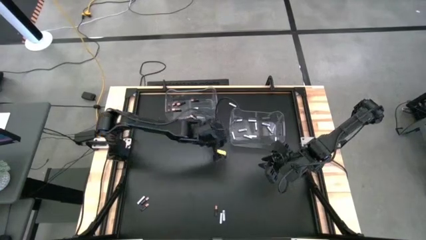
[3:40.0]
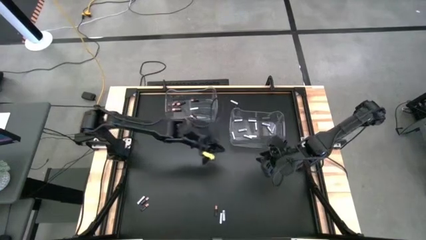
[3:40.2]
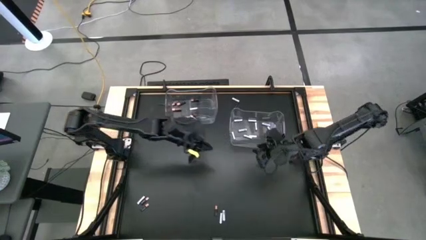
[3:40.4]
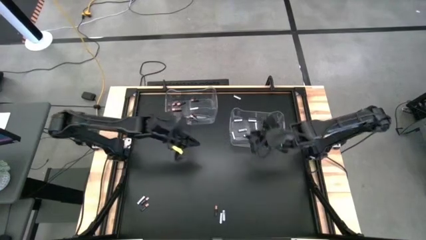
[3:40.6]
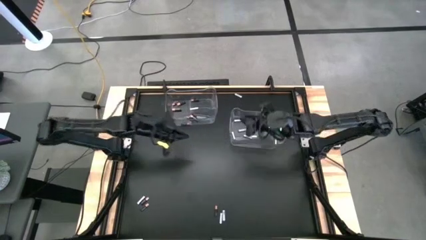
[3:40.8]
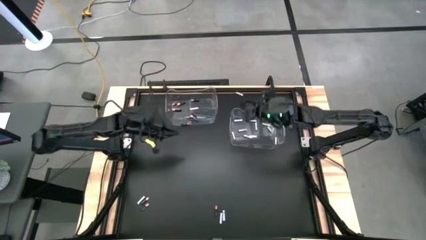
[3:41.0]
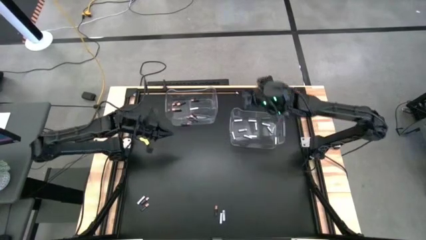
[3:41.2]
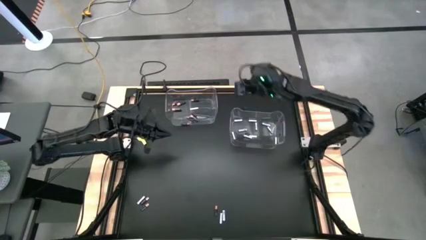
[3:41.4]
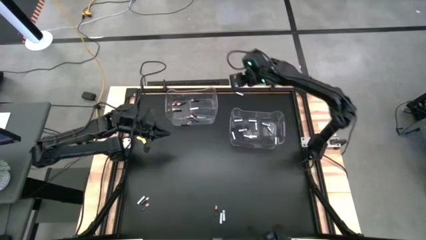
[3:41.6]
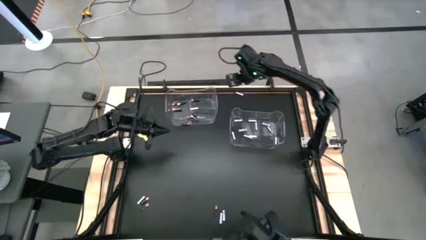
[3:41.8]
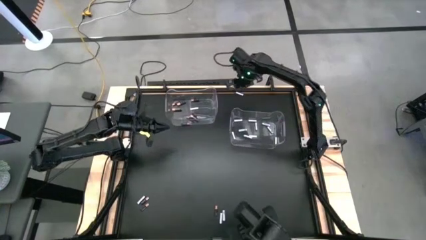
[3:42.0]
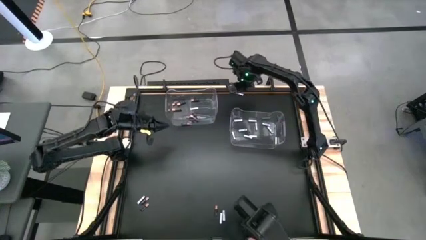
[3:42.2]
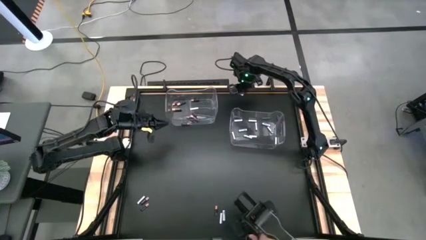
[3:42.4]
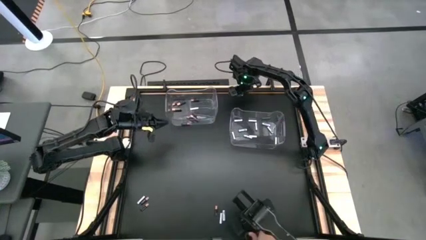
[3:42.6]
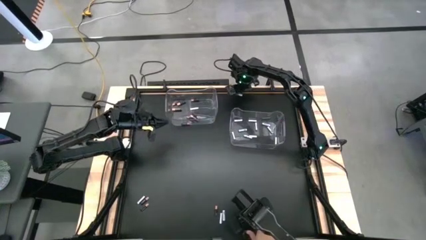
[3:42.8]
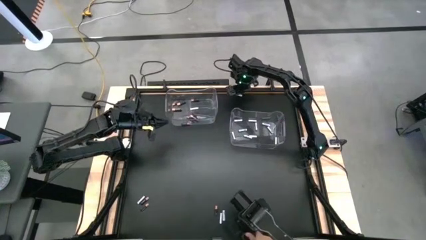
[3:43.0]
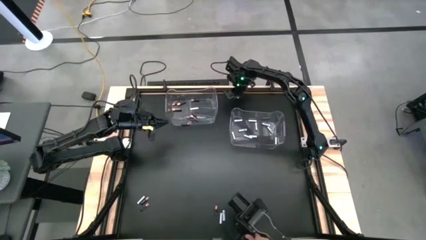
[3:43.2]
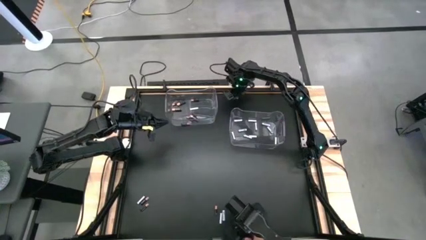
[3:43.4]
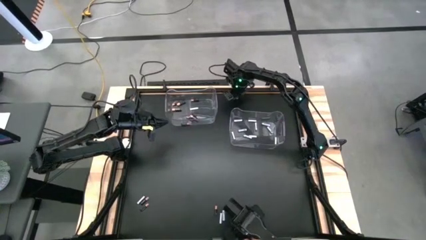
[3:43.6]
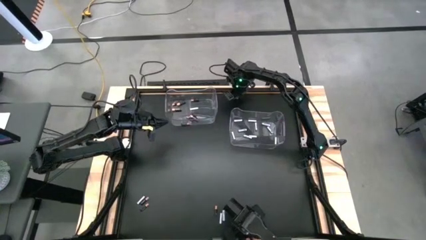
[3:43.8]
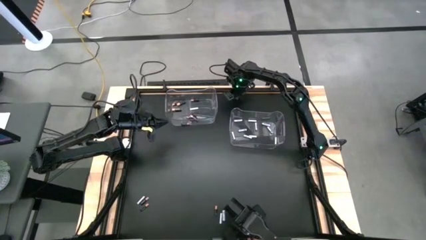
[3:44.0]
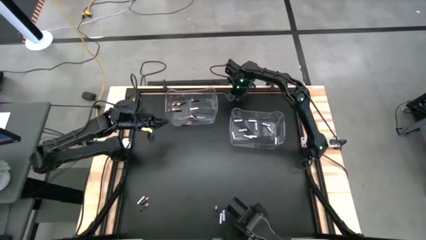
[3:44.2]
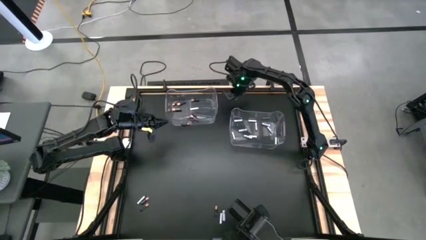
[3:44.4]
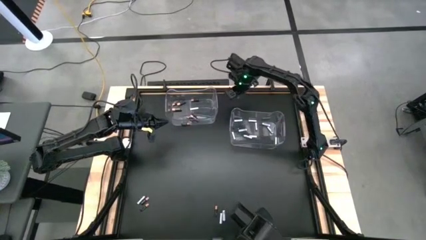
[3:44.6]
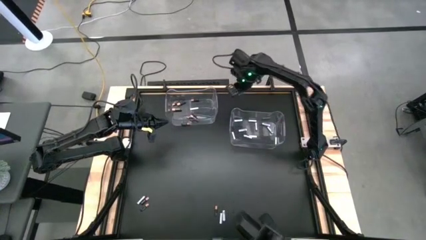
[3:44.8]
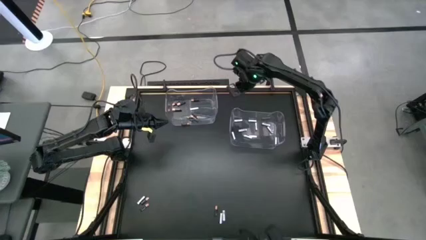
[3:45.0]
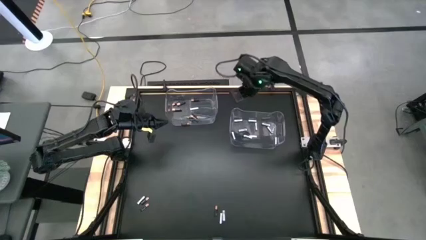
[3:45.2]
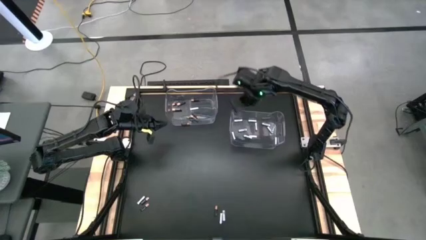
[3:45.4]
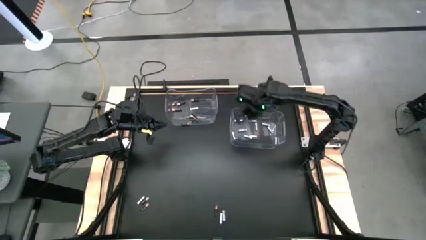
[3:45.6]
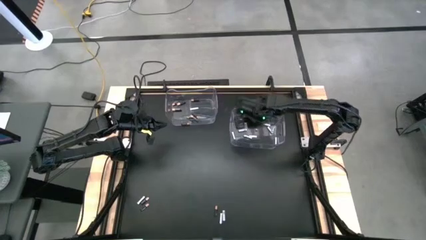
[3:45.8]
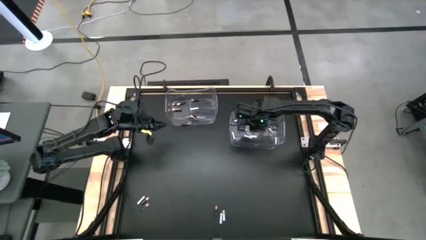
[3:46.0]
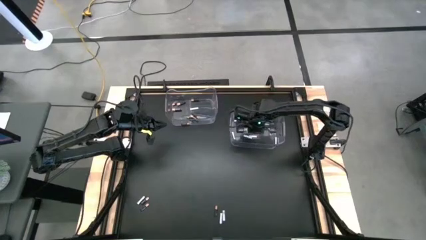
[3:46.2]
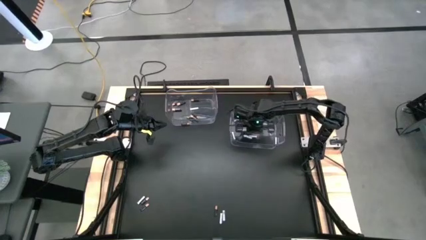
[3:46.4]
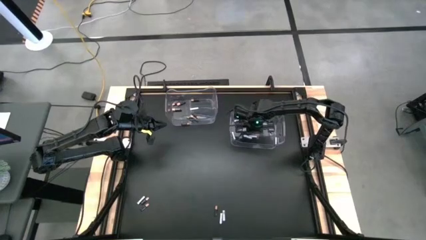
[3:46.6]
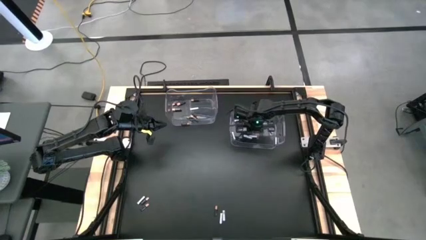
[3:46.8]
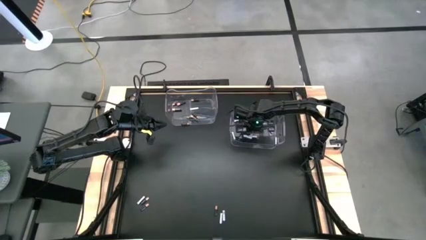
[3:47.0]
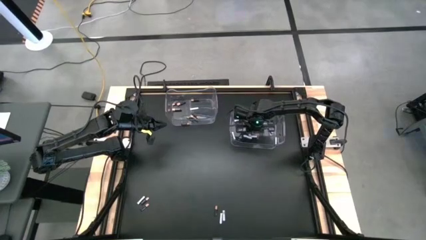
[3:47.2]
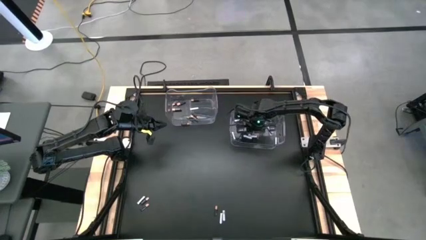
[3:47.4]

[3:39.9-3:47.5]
Task: Sort batteries
Put the white battery into the right transparent bin

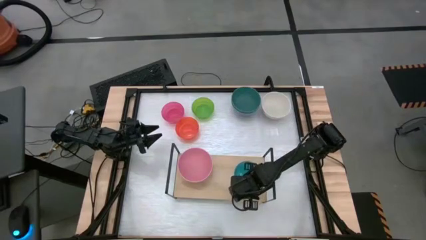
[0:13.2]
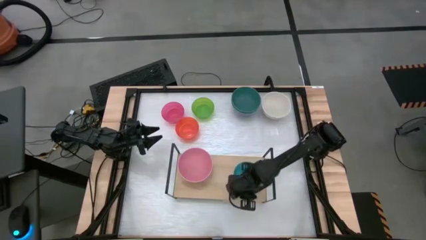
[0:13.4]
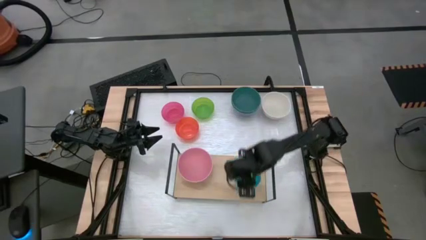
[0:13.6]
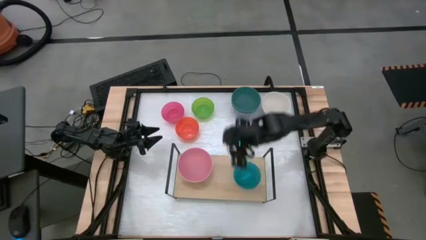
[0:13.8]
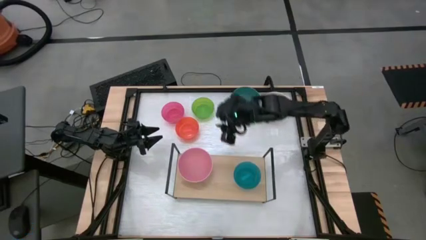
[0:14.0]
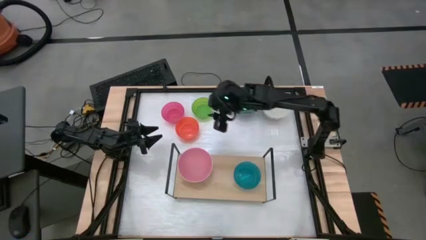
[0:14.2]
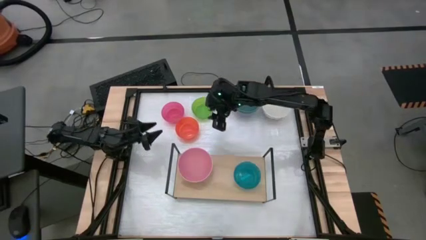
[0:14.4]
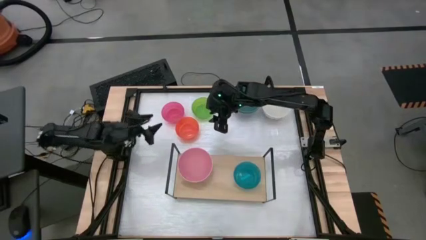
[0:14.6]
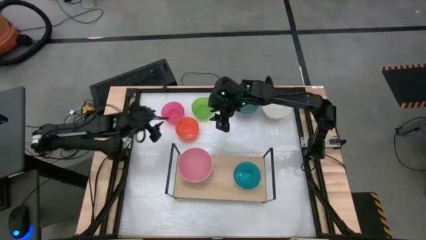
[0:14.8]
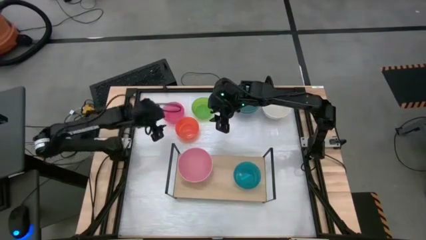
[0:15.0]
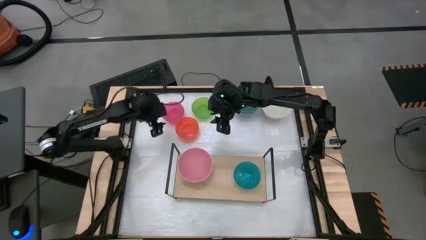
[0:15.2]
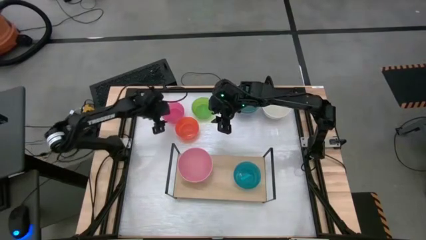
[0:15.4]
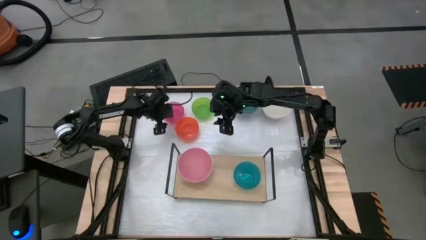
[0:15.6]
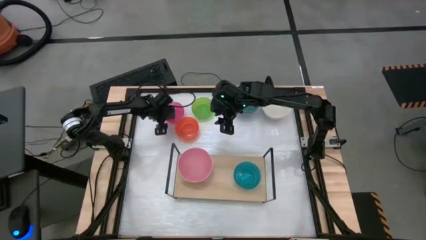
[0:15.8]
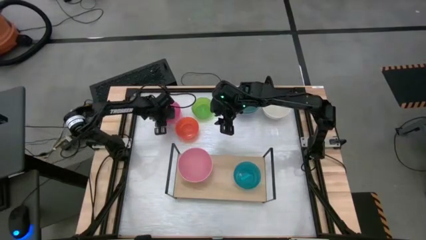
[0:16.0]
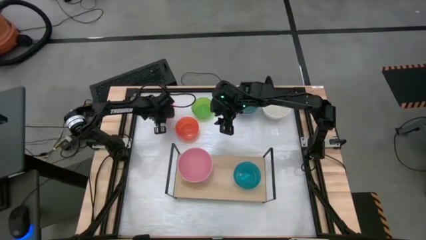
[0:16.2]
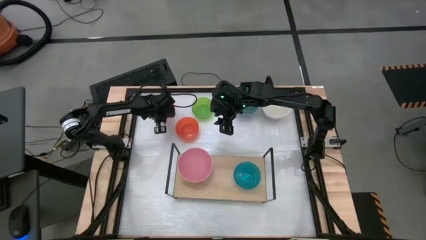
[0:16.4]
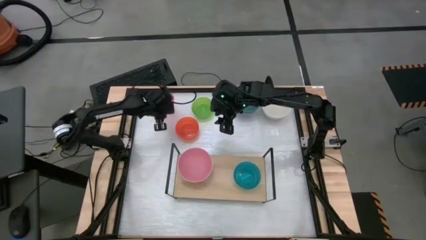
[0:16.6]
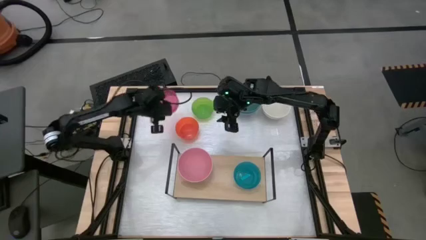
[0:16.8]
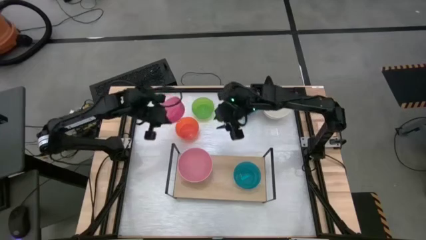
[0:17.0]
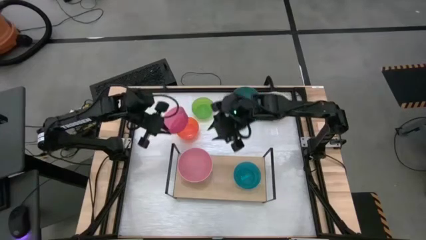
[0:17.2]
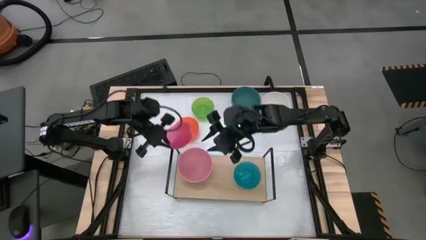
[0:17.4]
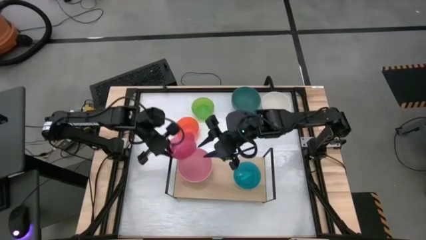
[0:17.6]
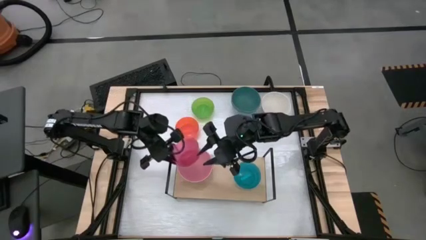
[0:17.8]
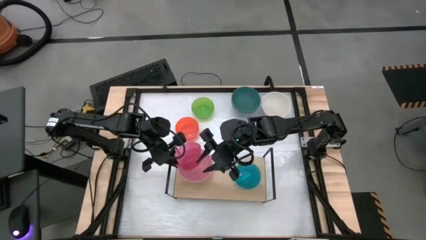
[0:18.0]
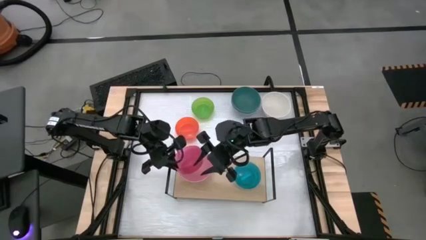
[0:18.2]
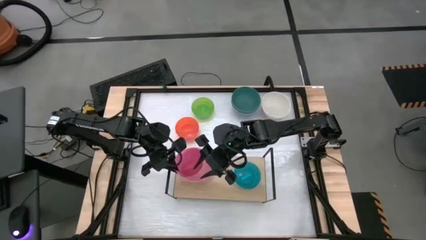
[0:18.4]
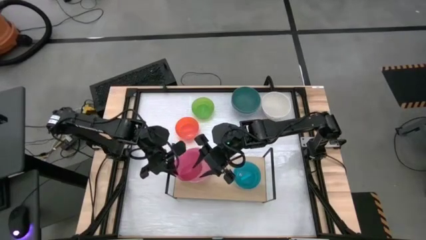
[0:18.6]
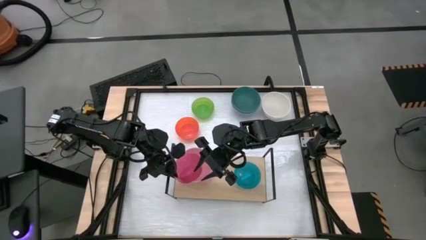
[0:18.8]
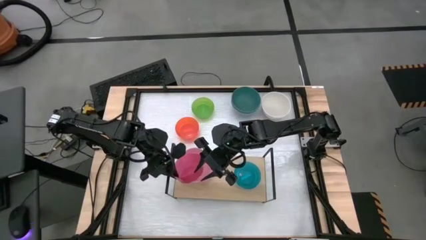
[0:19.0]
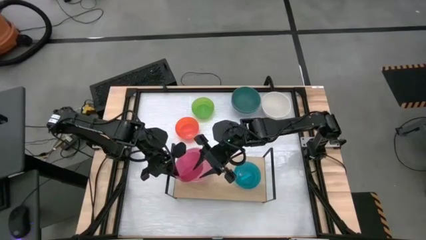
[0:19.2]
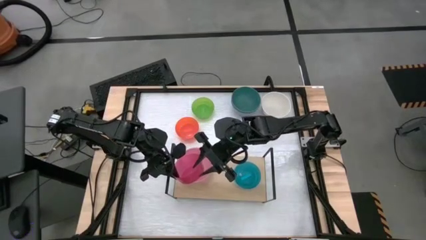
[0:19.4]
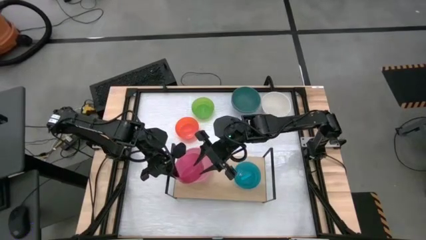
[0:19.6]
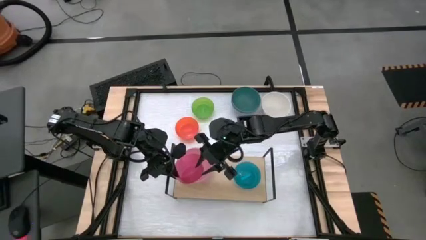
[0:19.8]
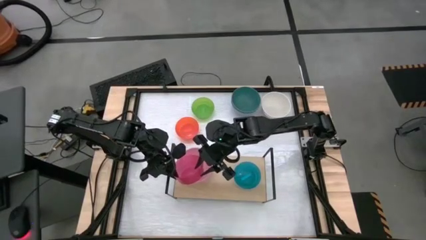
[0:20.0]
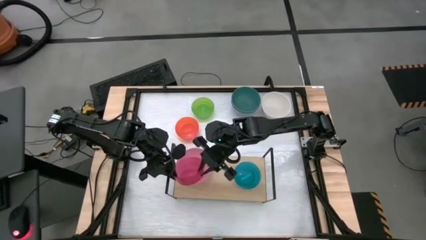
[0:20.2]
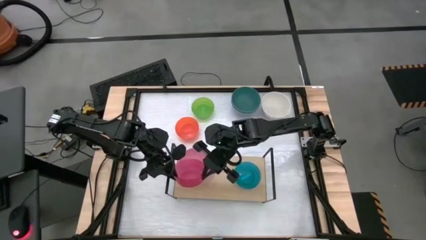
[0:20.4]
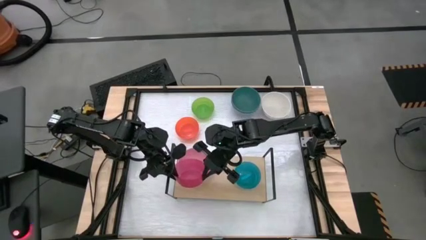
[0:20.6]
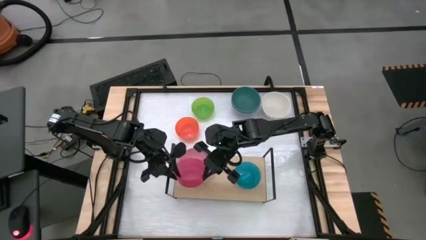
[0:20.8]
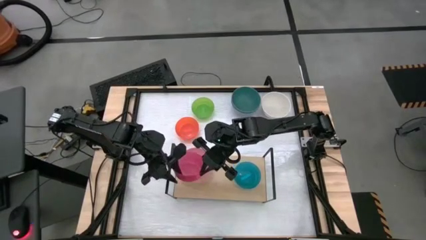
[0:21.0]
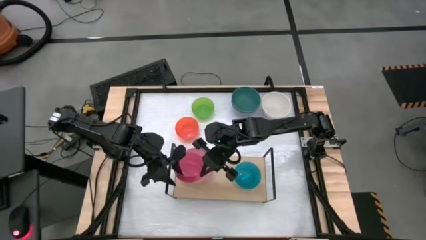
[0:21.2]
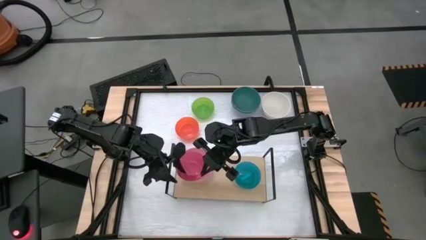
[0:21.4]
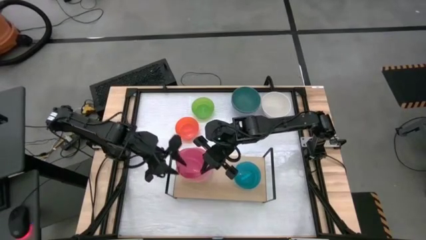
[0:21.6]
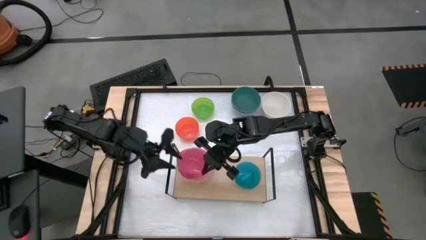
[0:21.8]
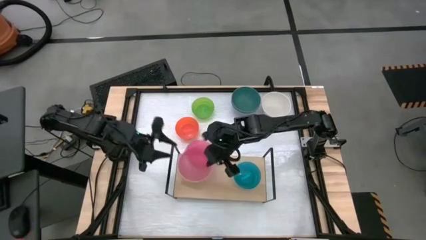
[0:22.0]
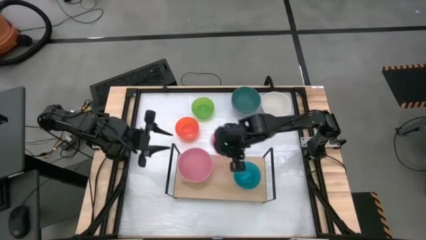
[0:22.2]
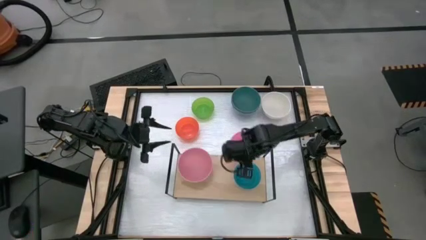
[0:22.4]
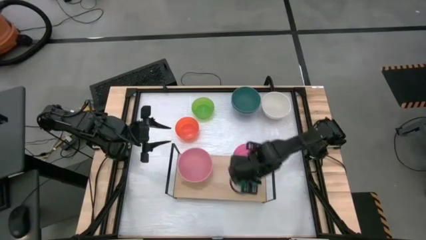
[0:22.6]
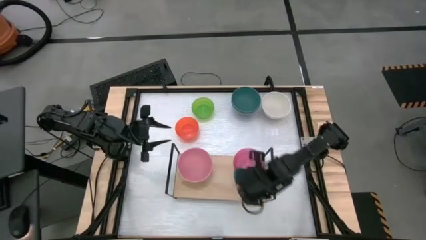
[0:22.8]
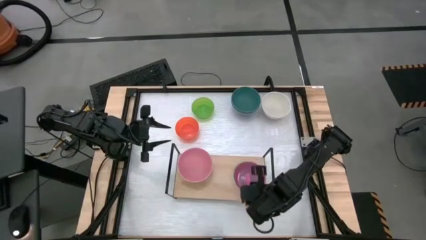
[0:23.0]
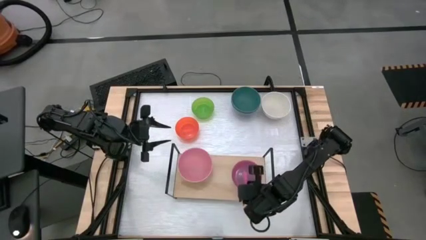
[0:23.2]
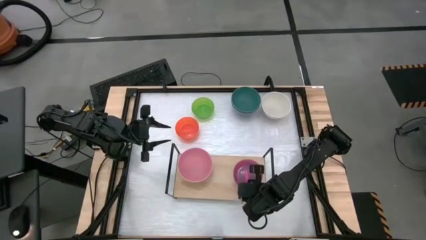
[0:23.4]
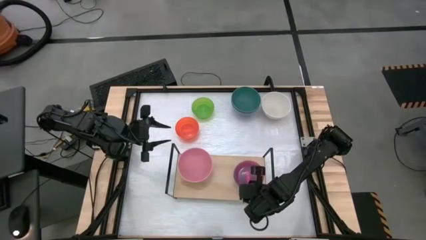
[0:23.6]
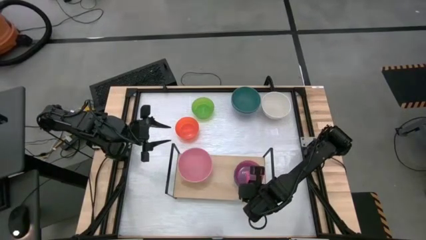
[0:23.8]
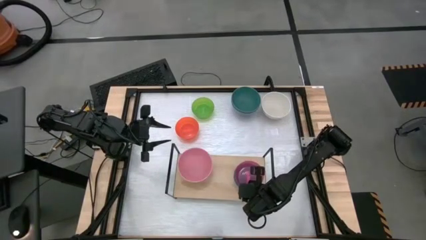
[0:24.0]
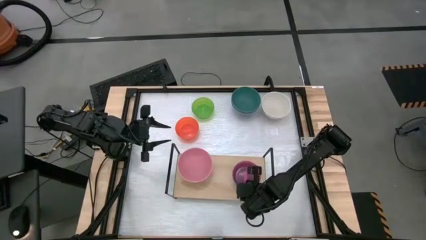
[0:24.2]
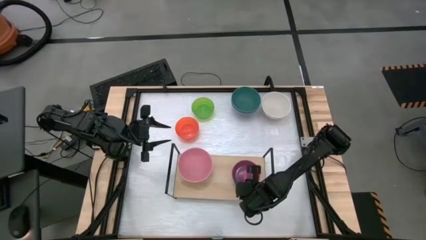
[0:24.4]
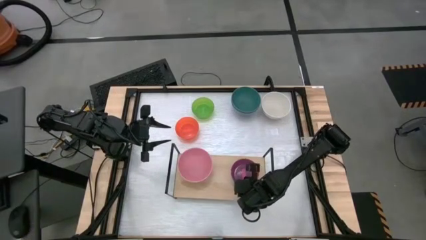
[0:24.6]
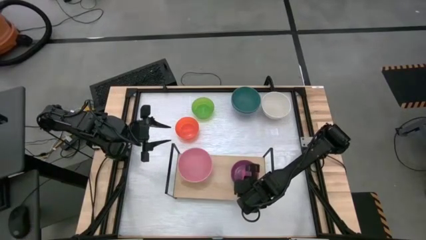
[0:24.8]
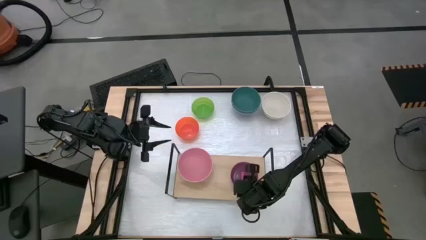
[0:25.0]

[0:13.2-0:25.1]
Task: Place and stack bowls onto a shelf
Stack the small pink bowl on top of the small blue bowl on the shelf
